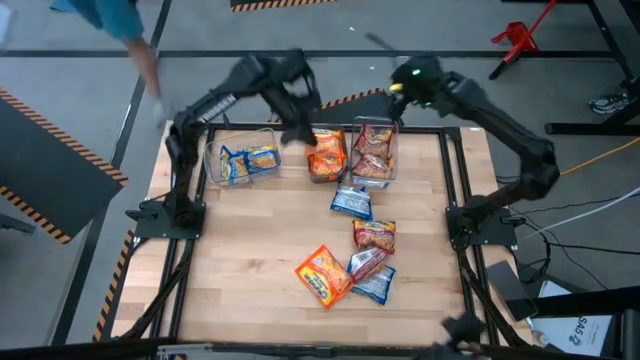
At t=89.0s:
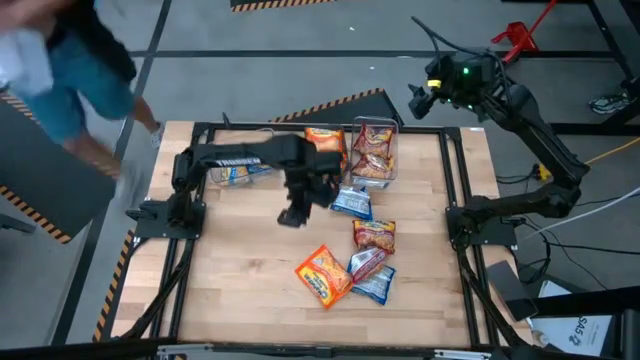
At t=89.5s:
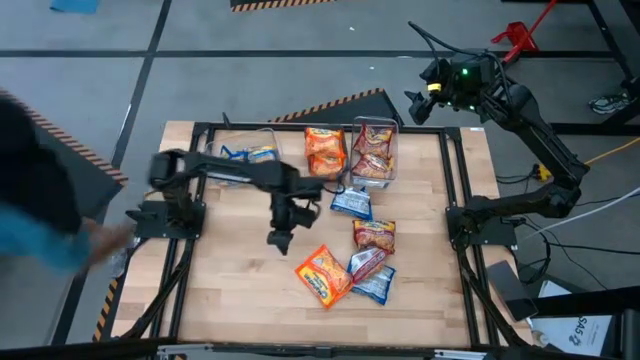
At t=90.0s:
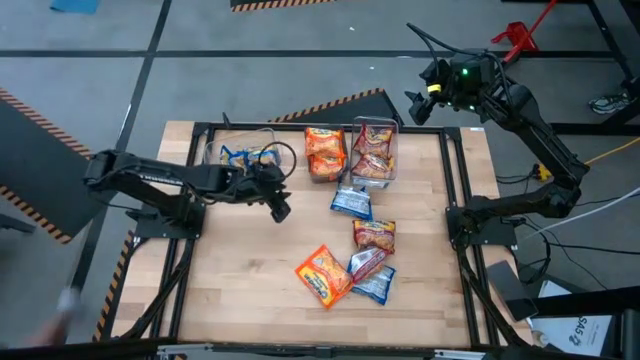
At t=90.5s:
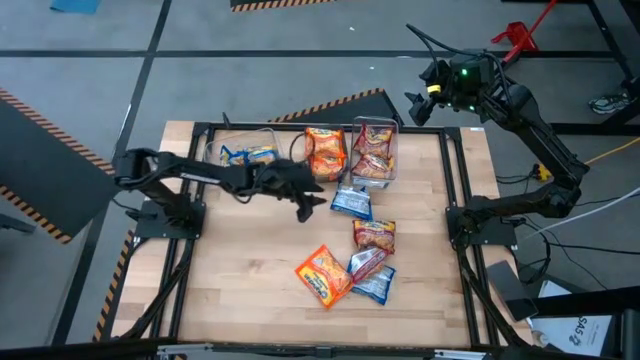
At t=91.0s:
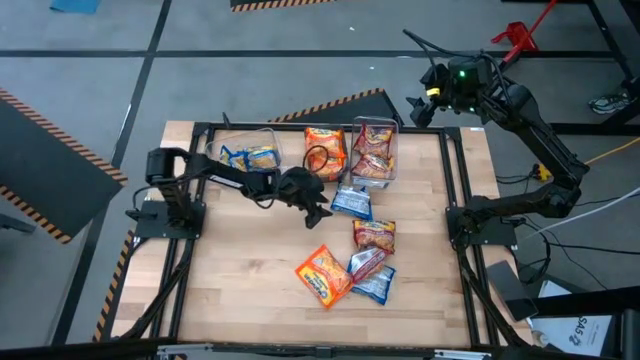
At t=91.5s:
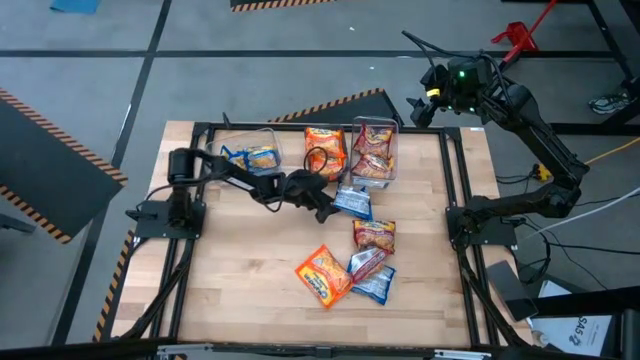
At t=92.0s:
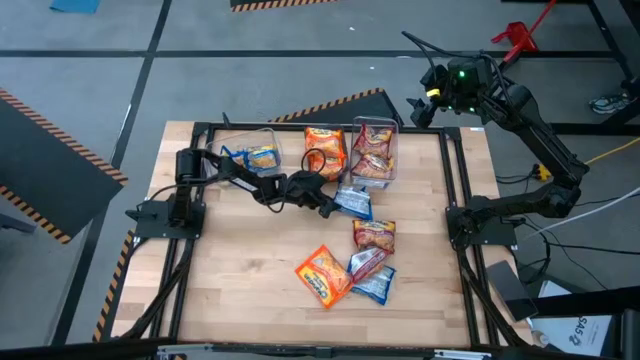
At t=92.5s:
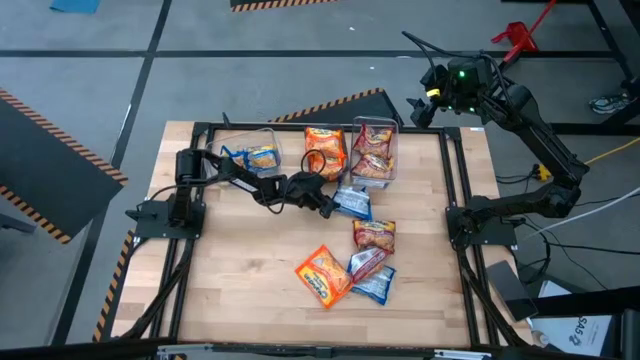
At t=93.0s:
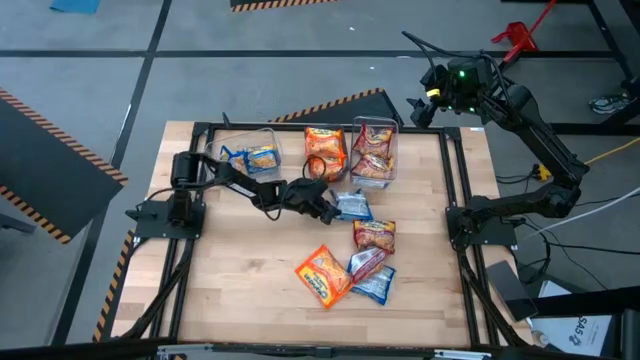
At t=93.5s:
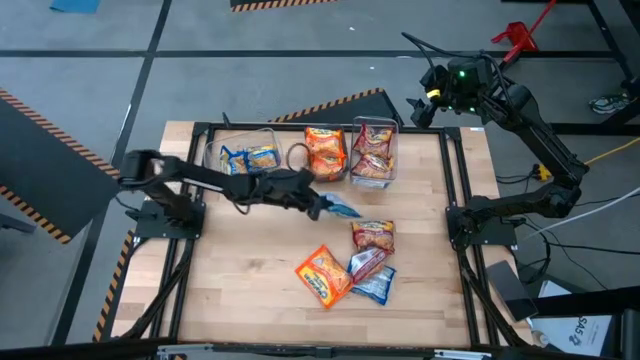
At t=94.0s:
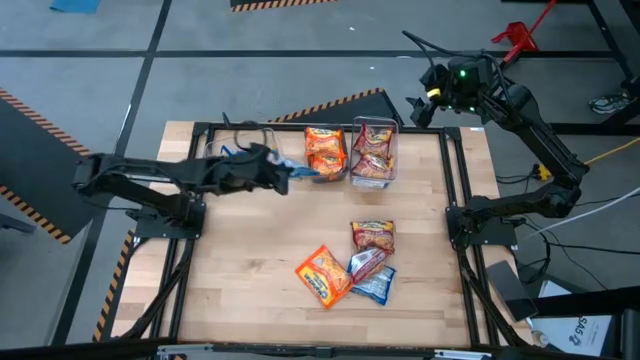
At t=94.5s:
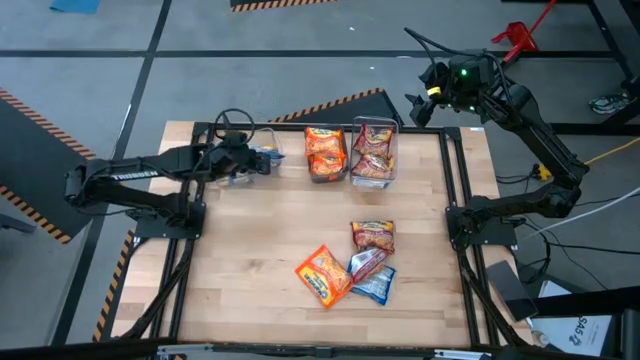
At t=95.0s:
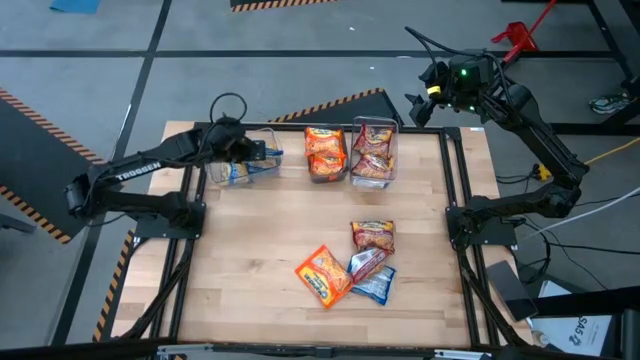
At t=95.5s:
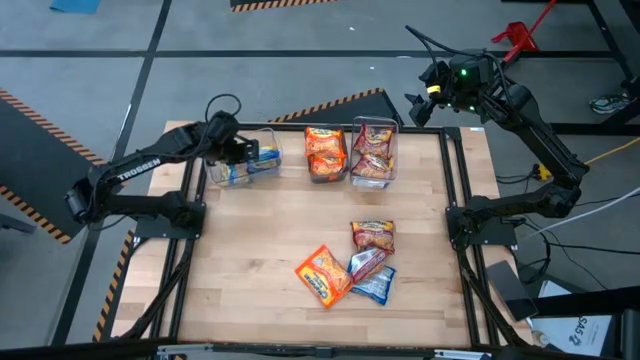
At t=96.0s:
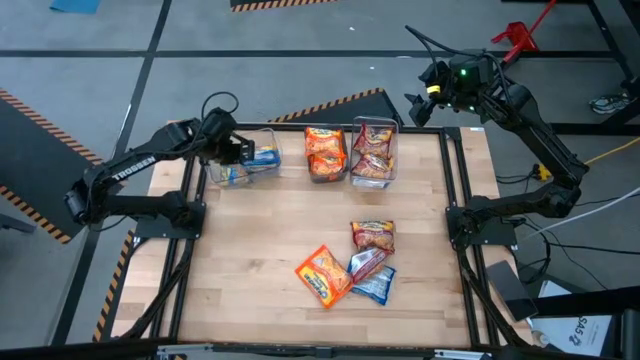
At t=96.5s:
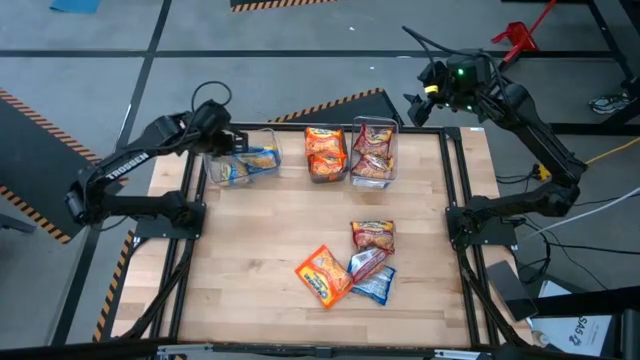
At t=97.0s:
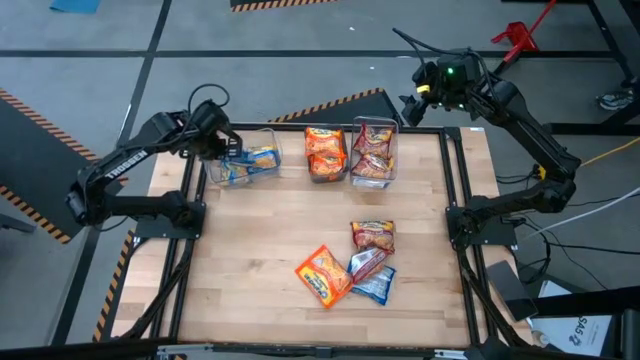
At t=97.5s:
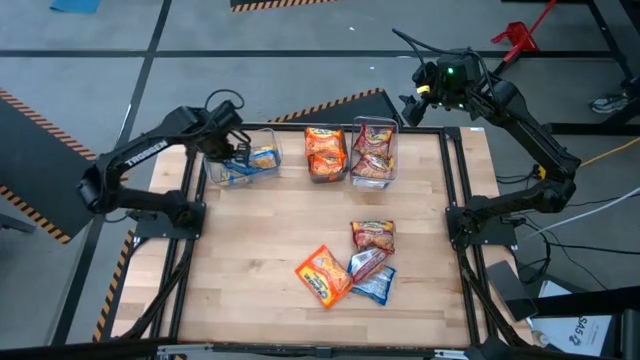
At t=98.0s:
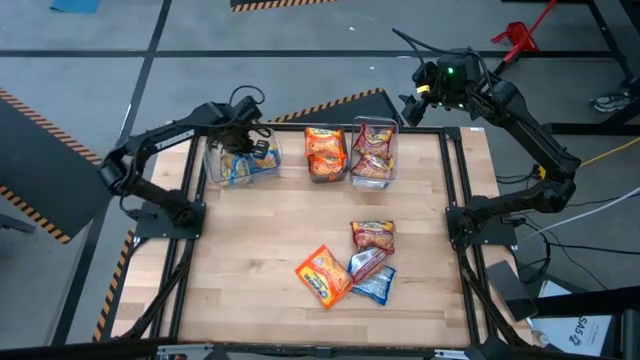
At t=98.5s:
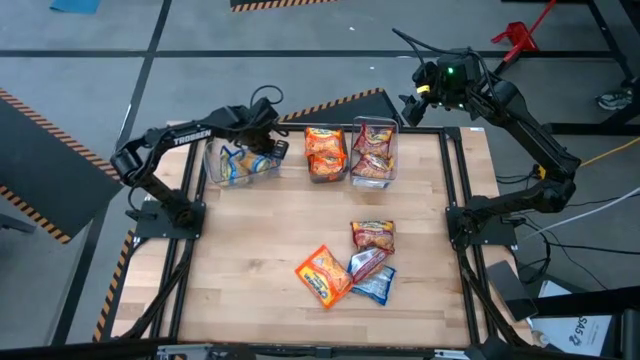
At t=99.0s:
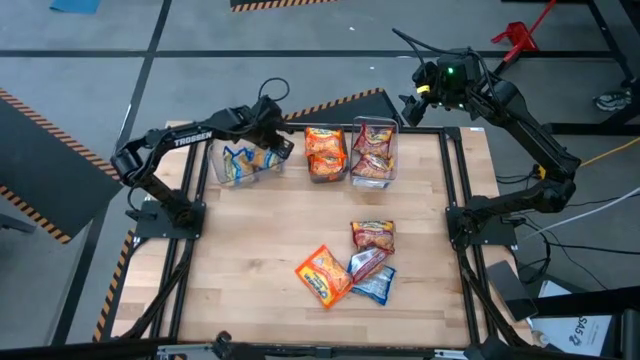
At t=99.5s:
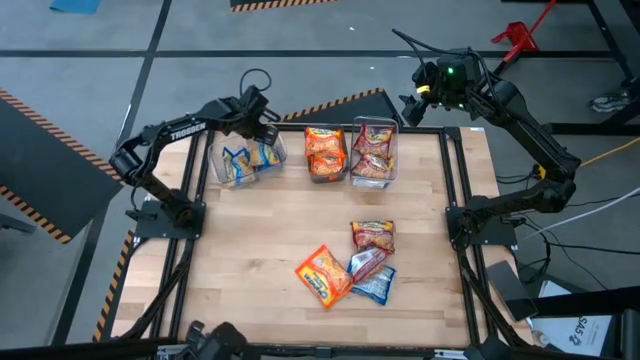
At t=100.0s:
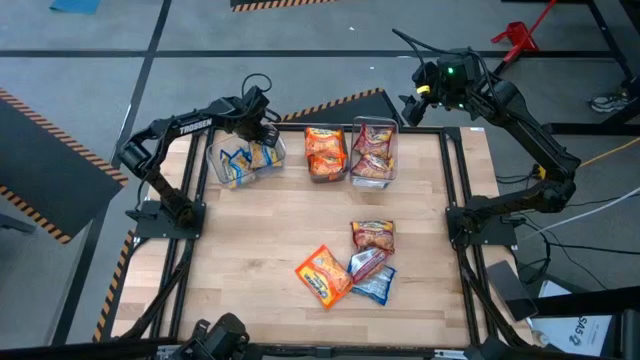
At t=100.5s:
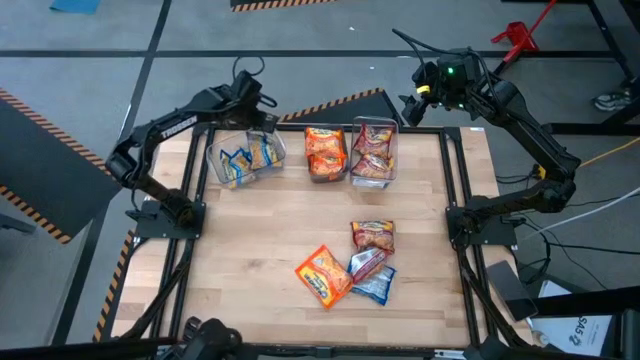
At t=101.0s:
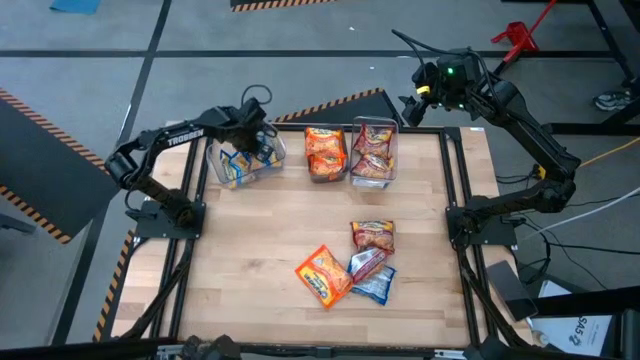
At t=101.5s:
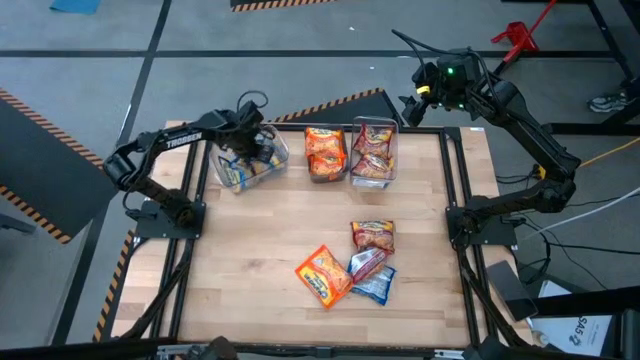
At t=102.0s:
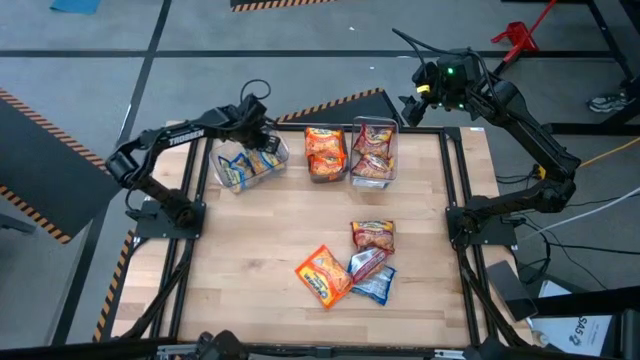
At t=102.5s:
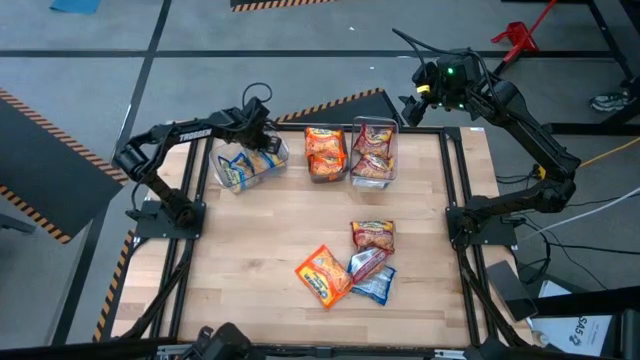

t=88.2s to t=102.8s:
Task: Sort Maruchan noodles
Put the blue noodle pack into the left transparent bin

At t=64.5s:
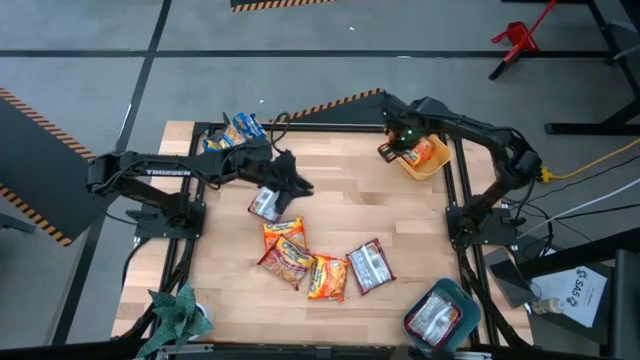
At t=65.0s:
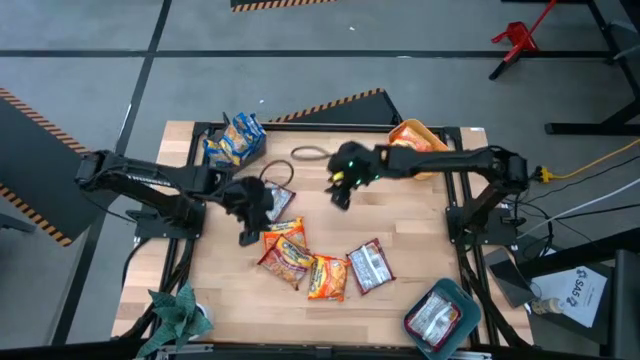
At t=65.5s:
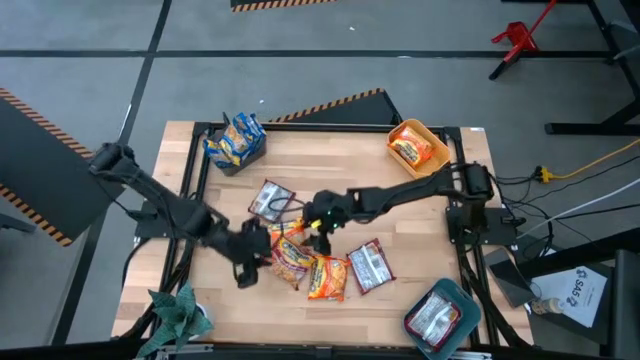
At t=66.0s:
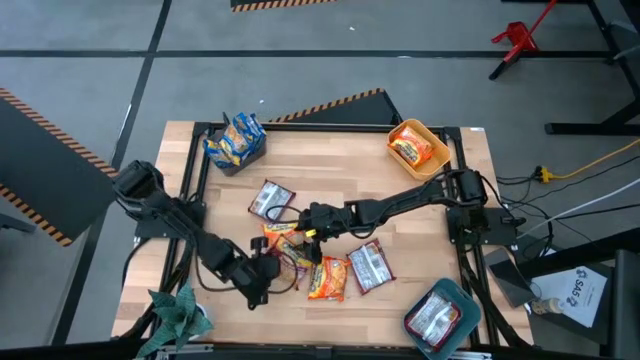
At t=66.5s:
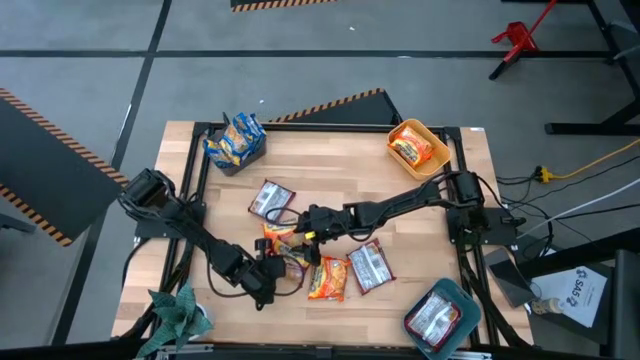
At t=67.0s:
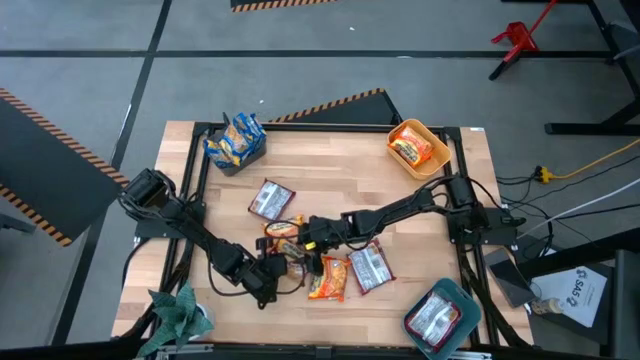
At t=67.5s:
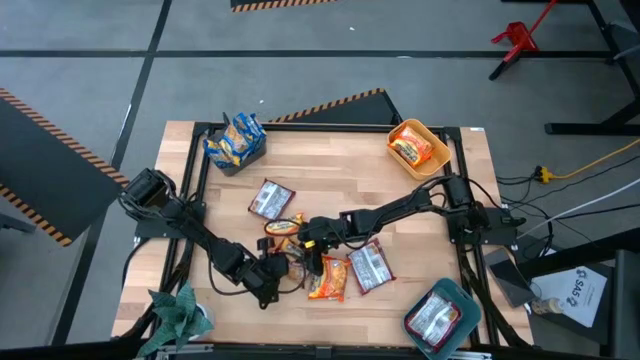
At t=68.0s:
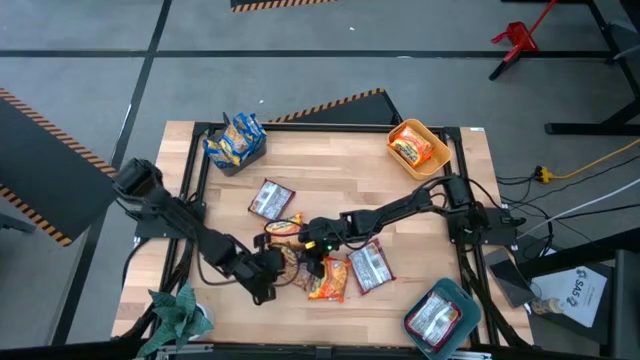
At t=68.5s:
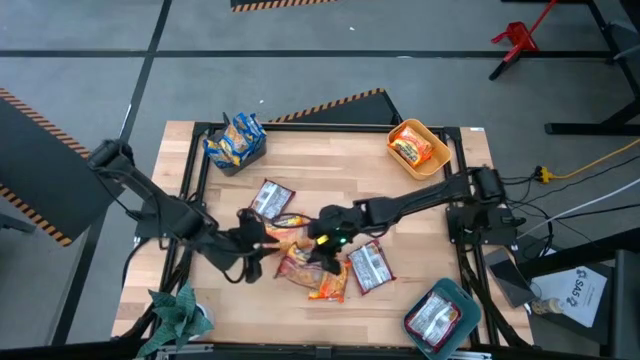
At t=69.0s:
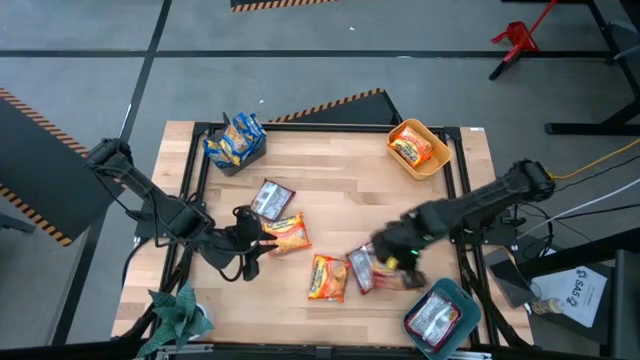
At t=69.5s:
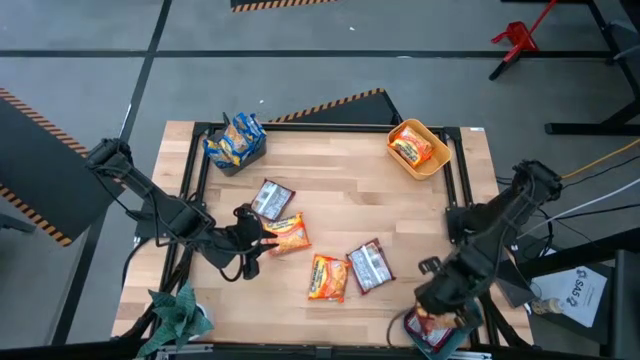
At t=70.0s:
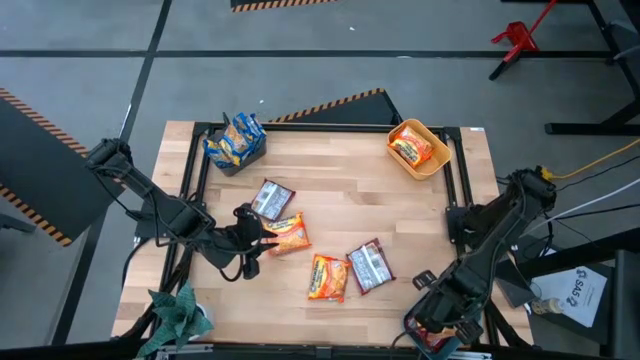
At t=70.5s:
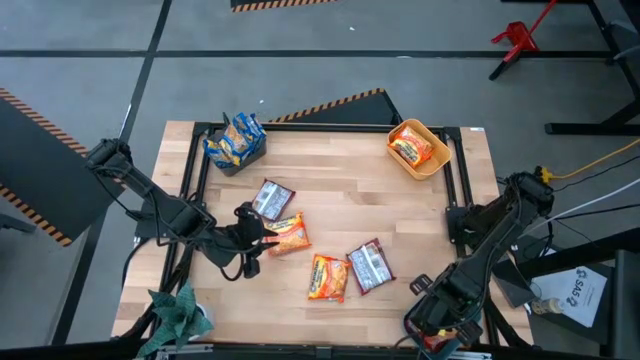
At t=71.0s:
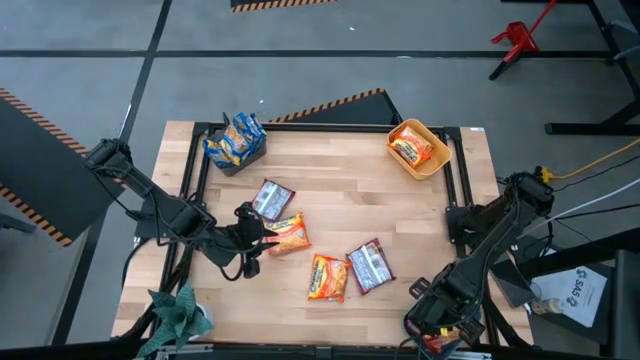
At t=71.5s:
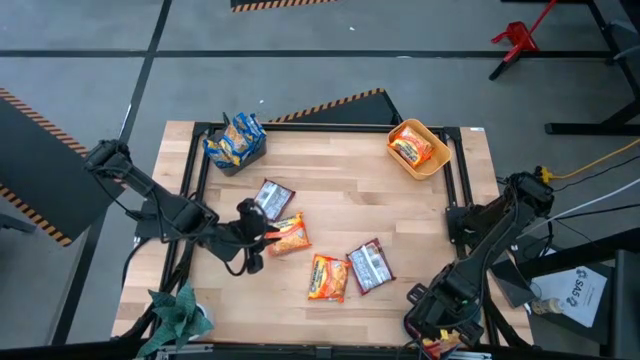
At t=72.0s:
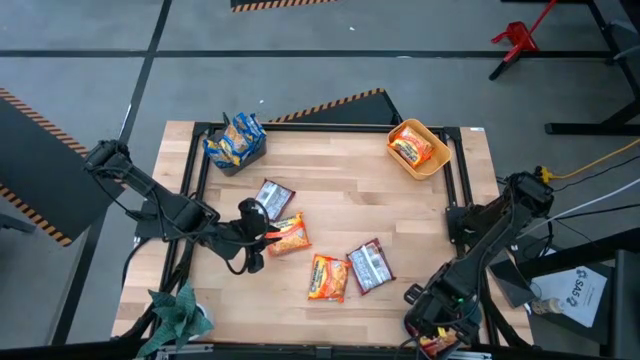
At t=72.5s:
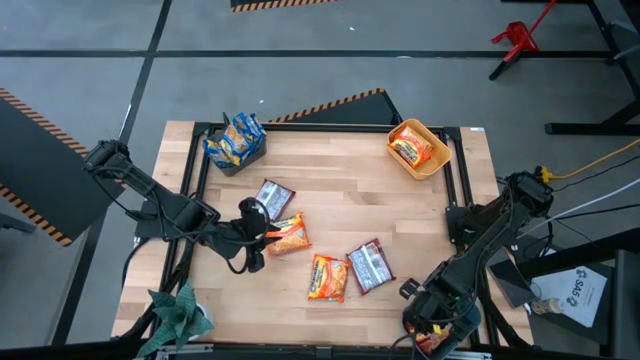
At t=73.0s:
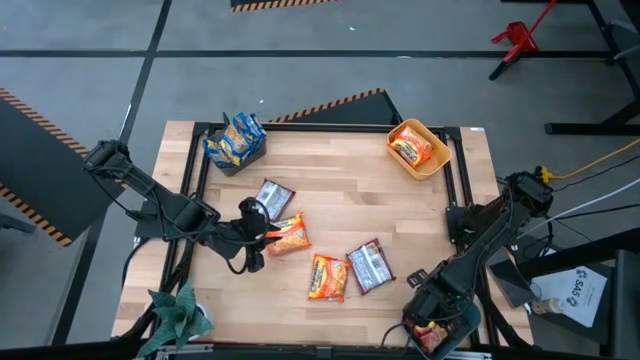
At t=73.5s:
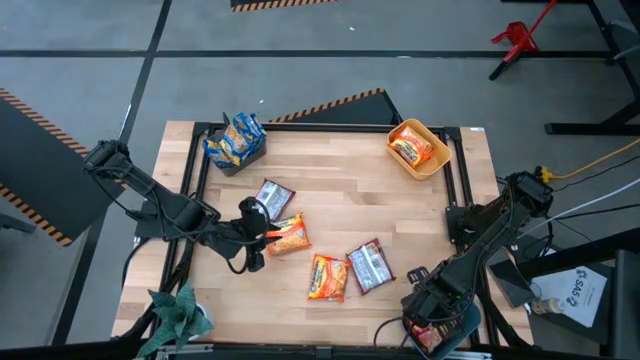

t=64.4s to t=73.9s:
Task: Sort Maruchan noodles
Put the red noodle pack into the blue bin
